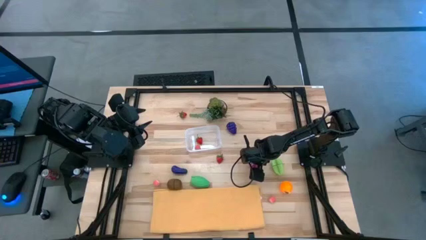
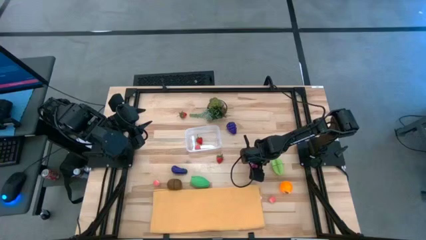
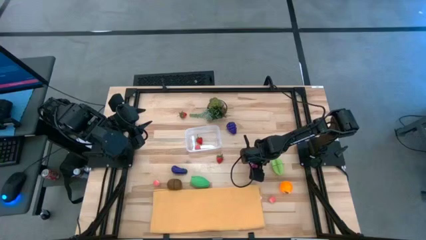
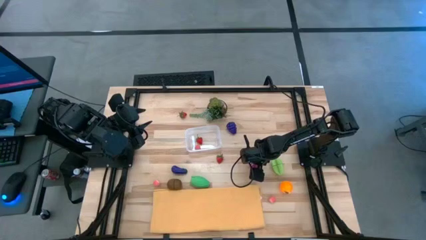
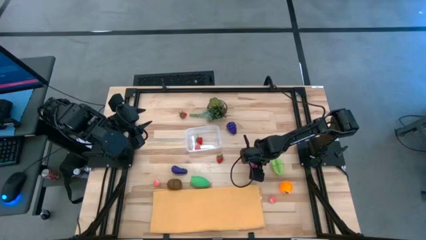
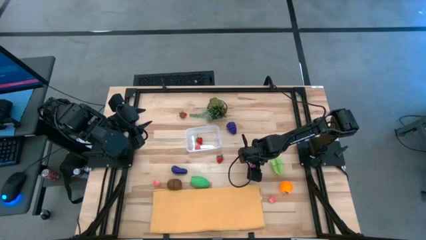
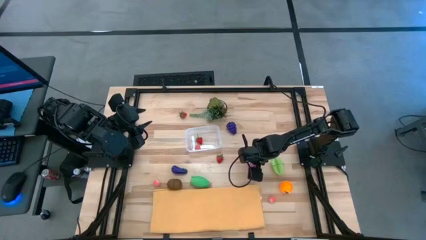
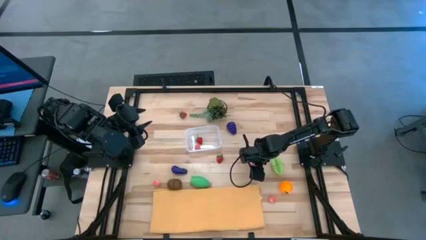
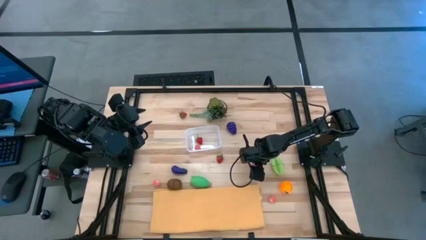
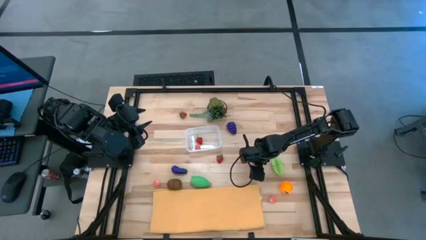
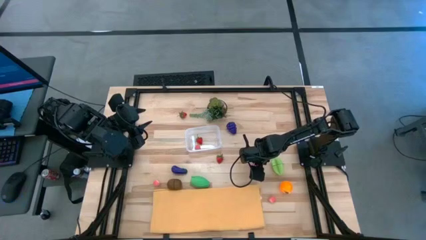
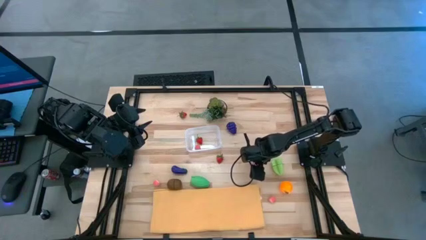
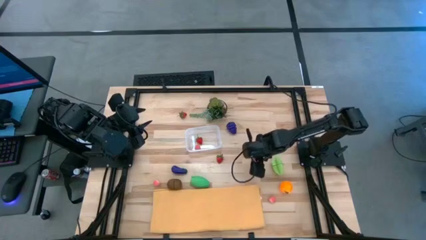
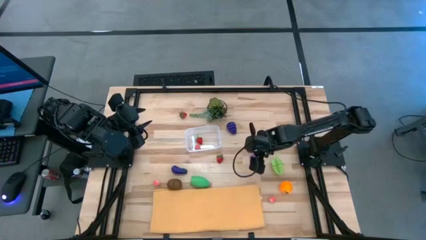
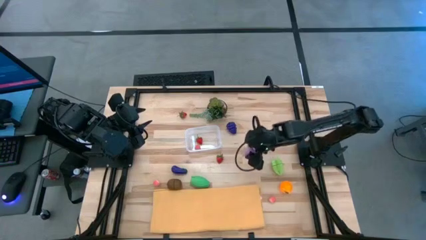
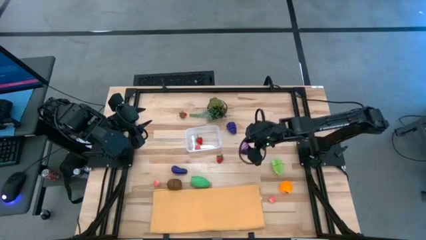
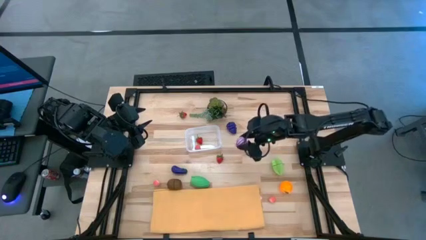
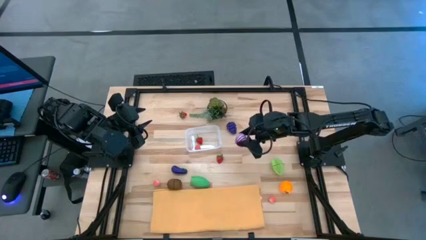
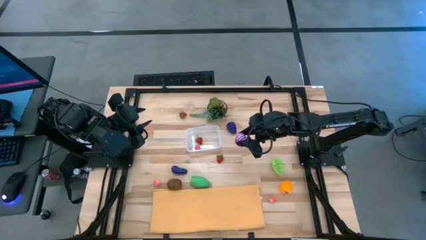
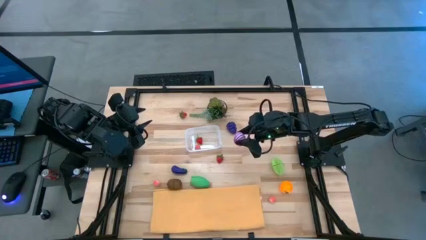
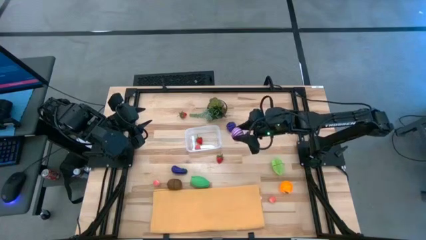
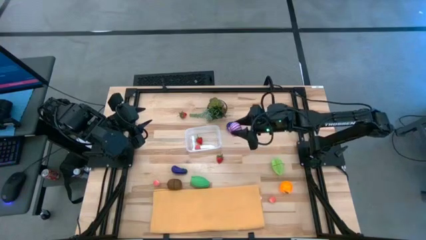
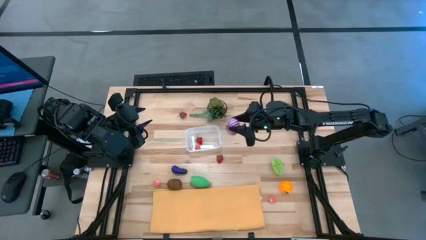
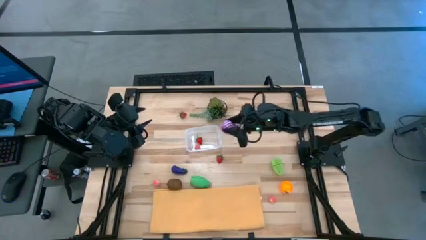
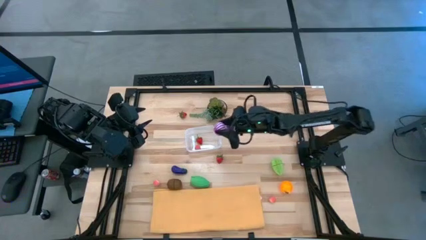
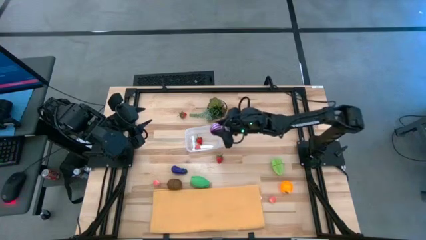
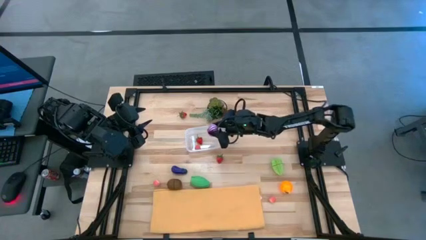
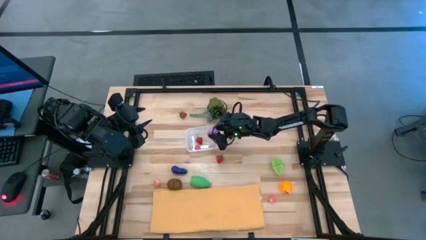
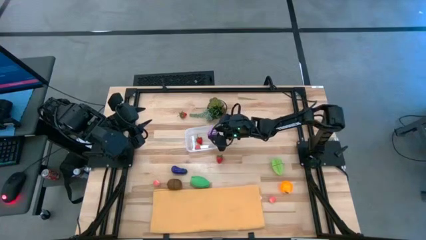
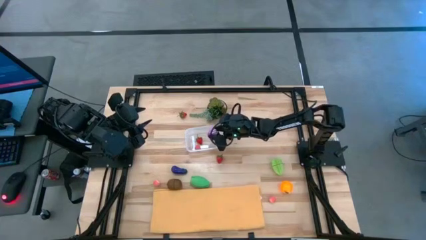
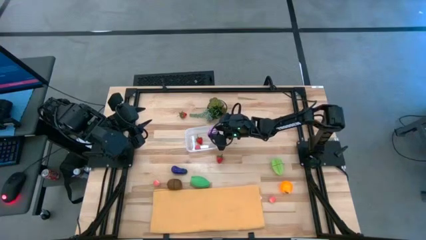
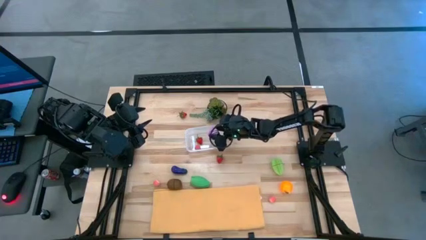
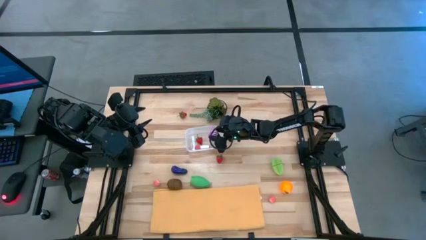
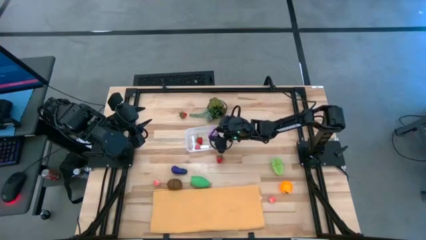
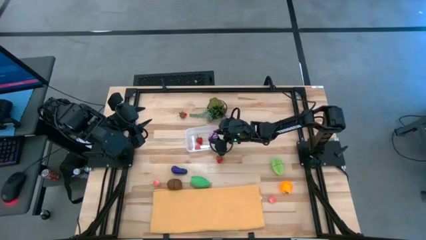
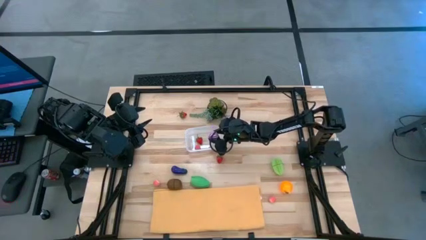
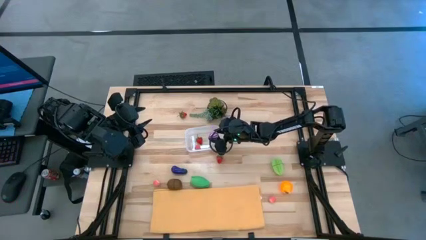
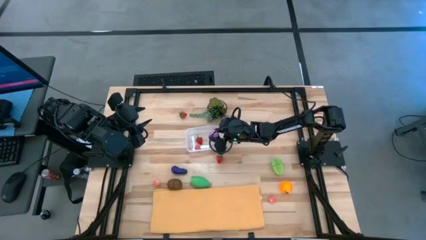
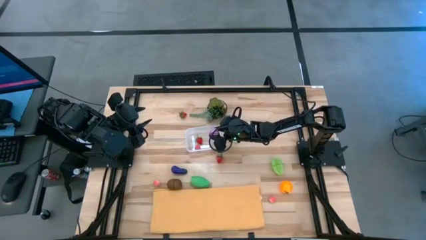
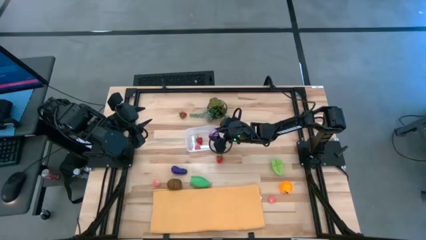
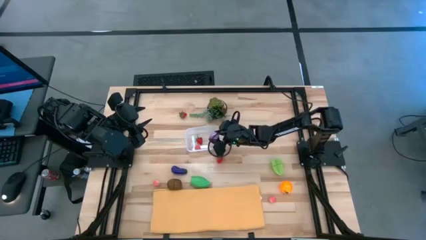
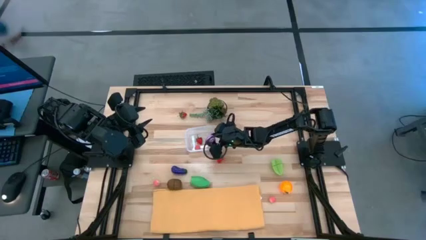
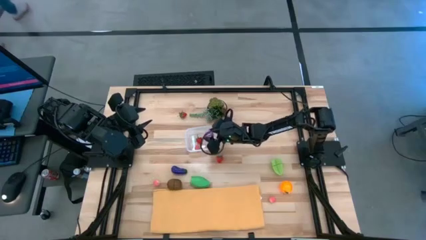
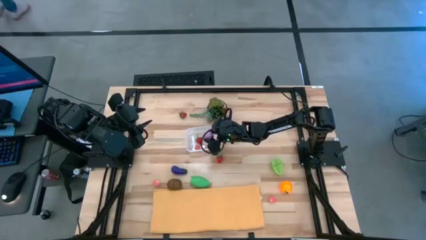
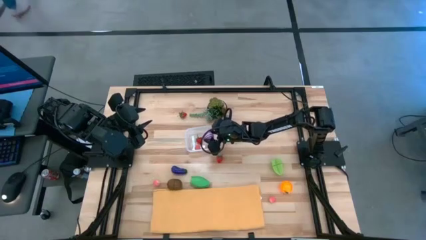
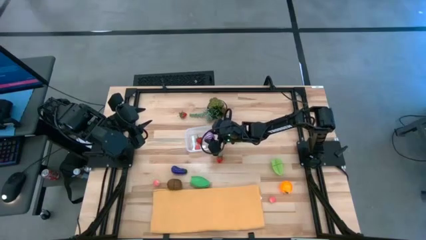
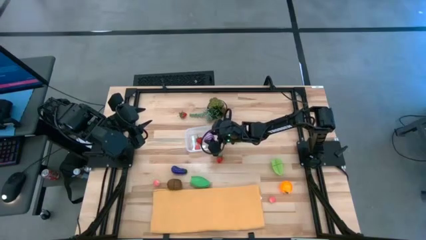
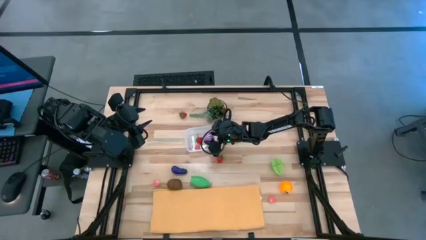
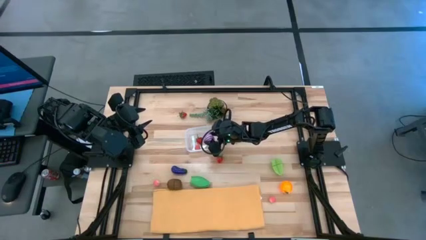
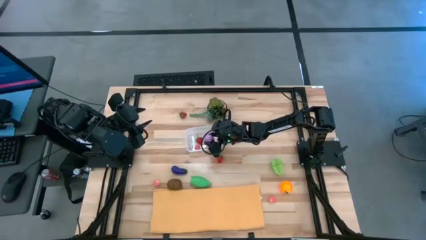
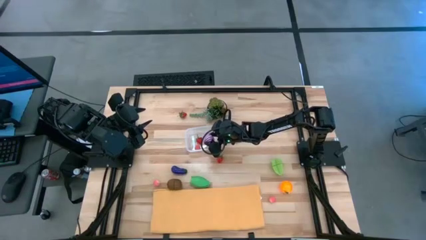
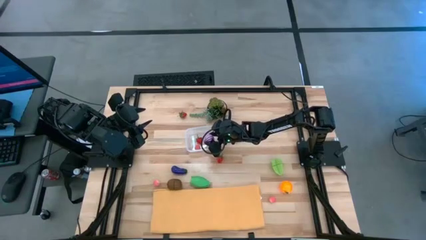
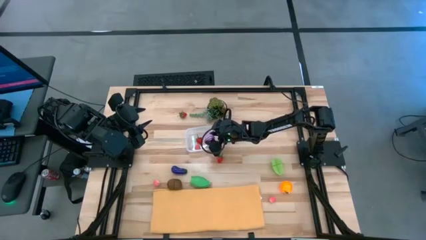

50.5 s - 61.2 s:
Task: Pick and placing Produce into tupperware
Put the purple onion into the transparent bin

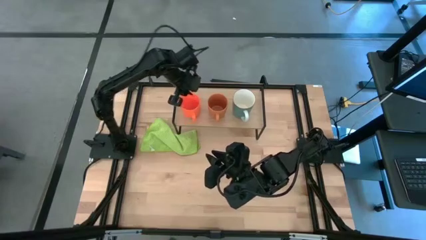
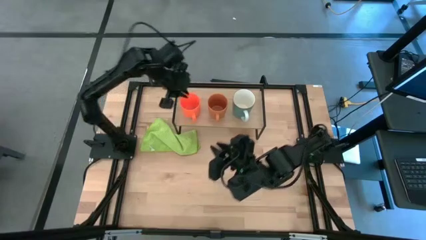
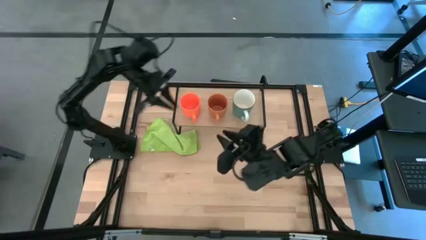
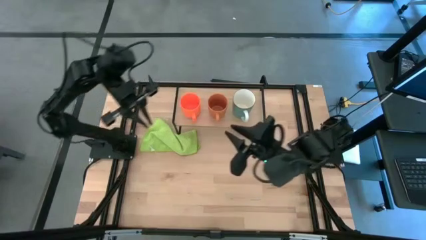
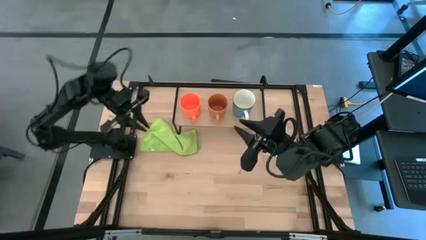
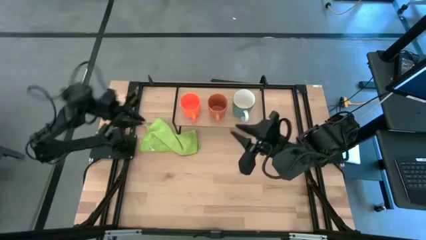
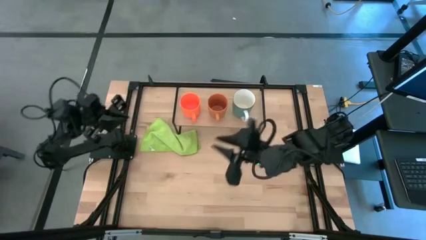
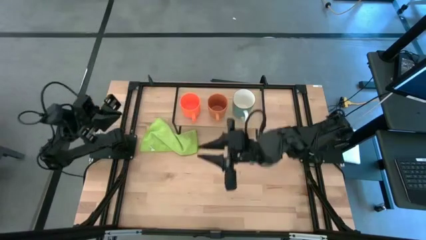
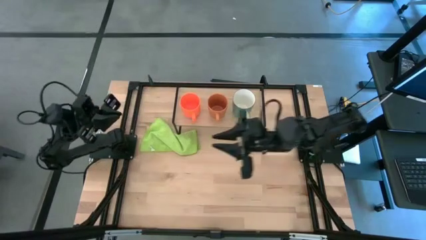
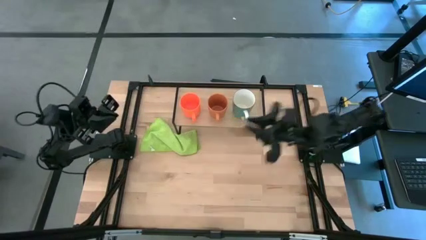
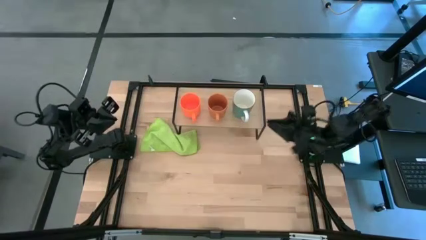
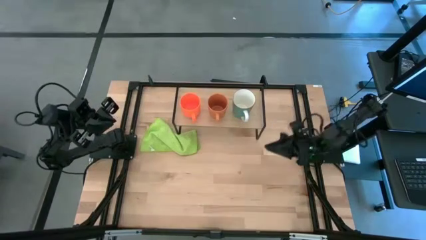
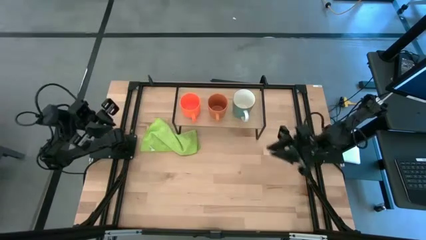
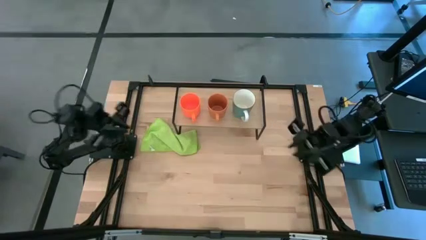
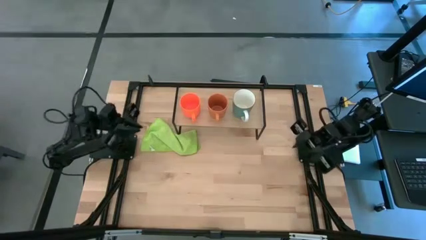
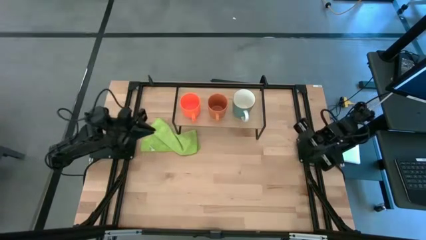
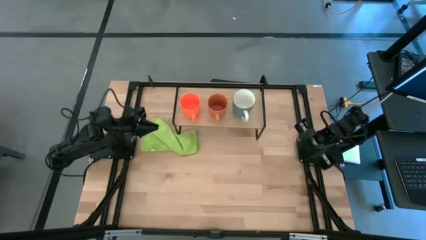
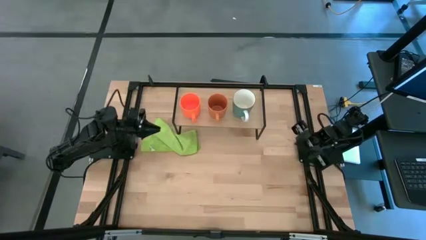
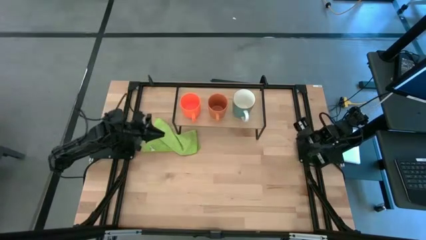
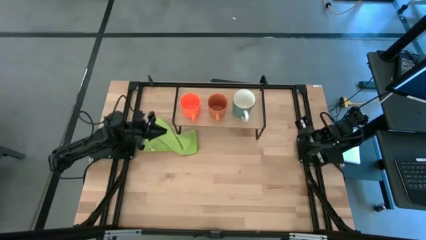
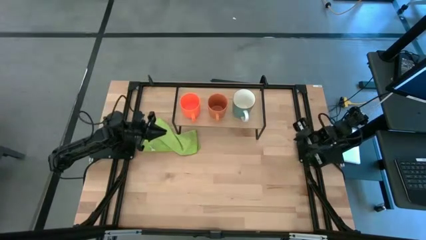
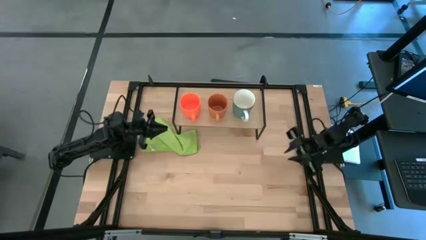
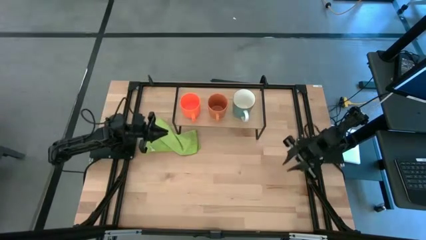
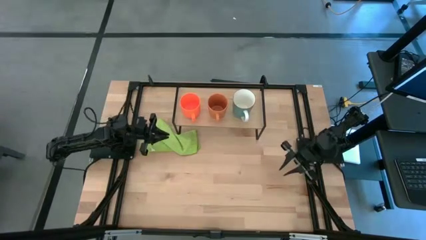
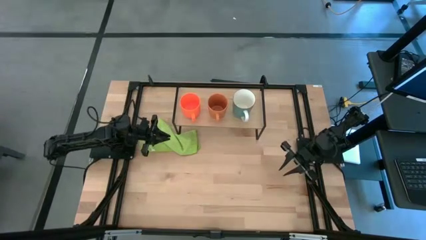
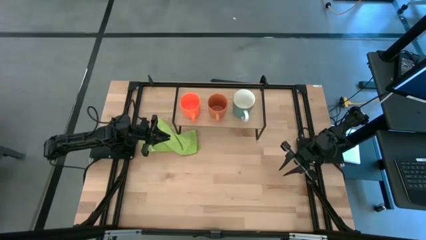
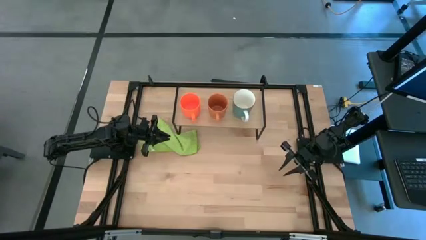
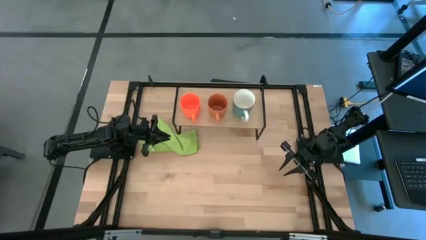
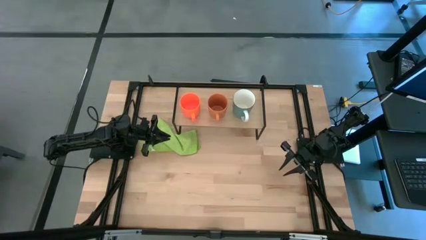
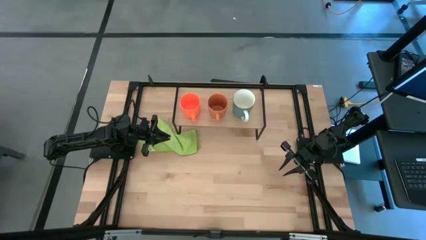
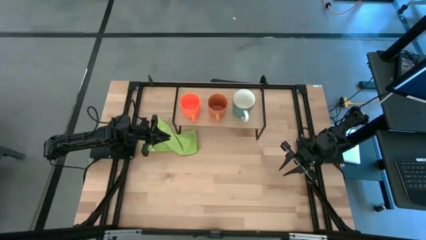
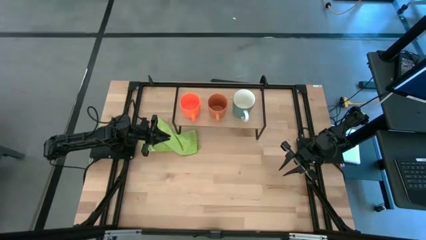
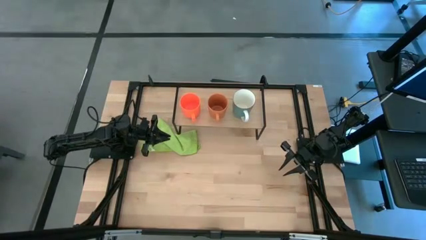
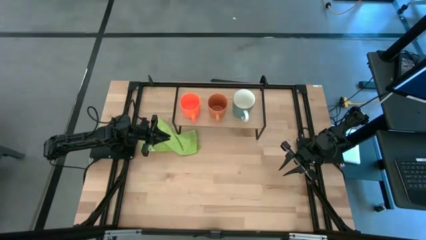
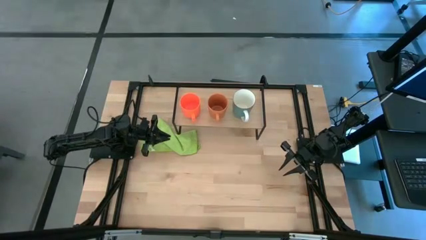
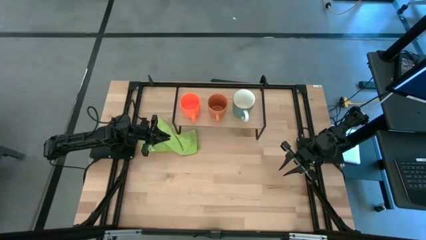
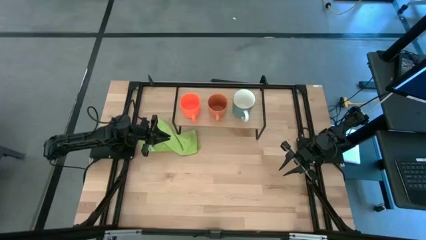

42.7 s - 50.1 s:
Task: Stack small to large cups/mugs on shelf
Return to Home Position
